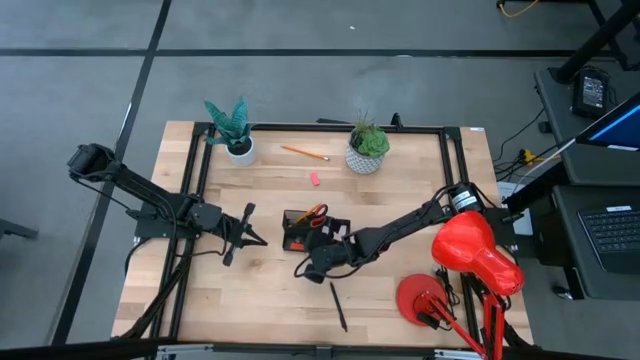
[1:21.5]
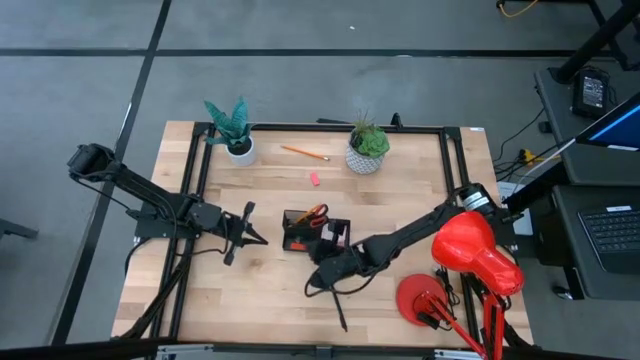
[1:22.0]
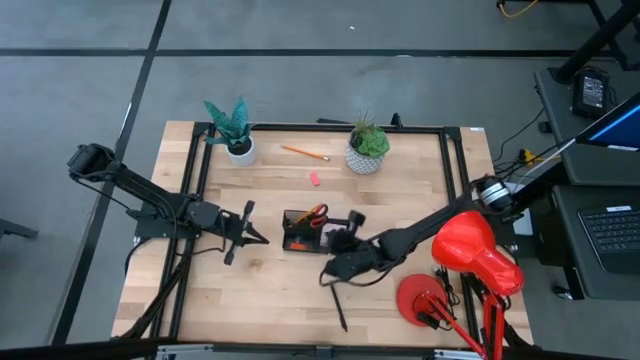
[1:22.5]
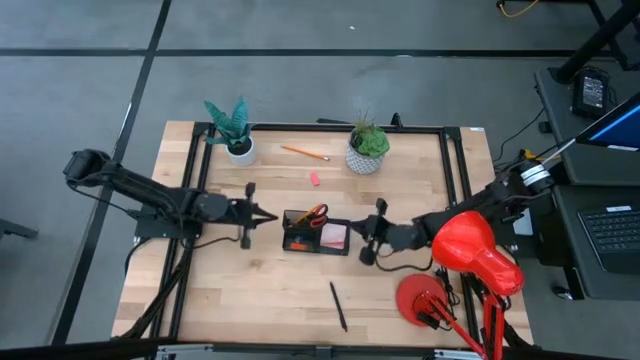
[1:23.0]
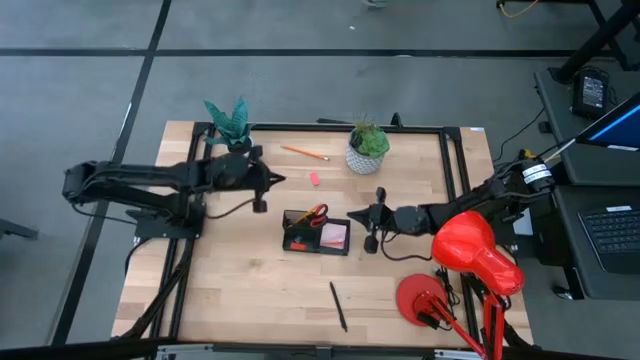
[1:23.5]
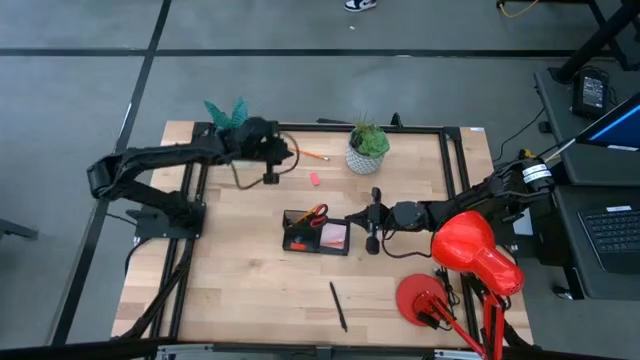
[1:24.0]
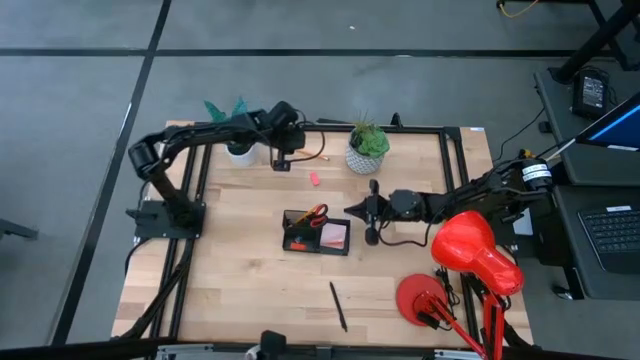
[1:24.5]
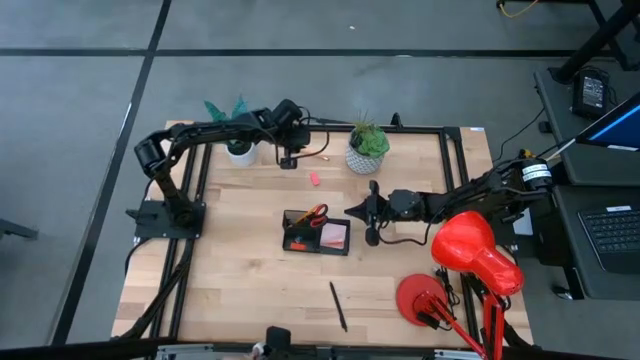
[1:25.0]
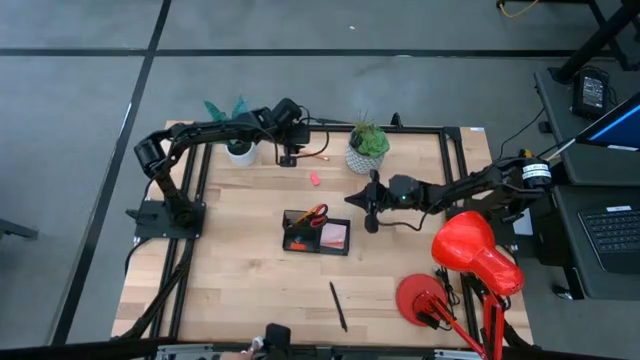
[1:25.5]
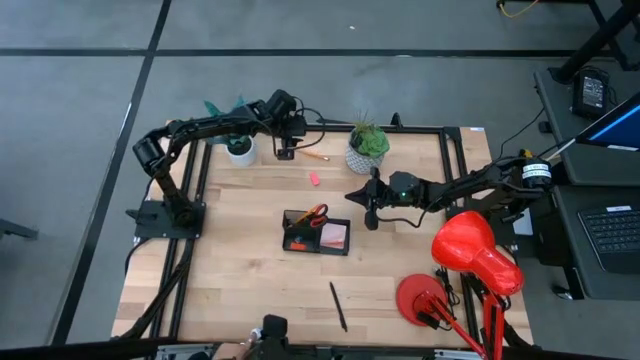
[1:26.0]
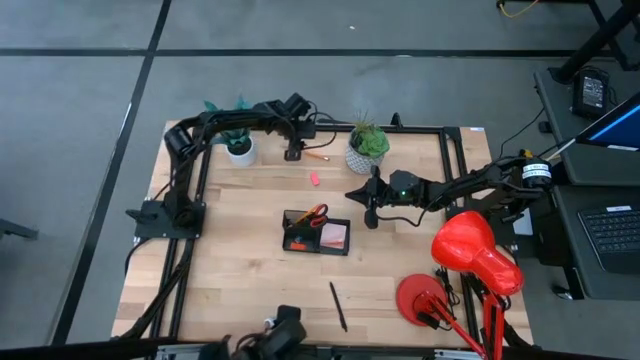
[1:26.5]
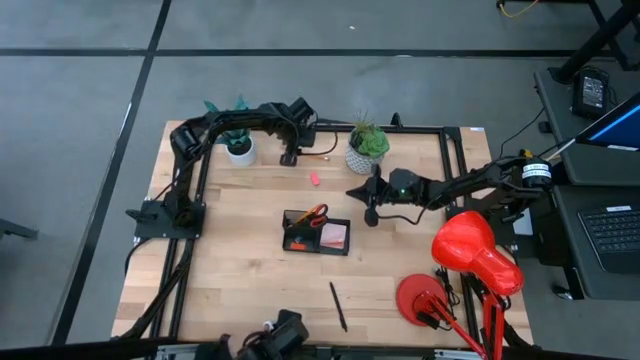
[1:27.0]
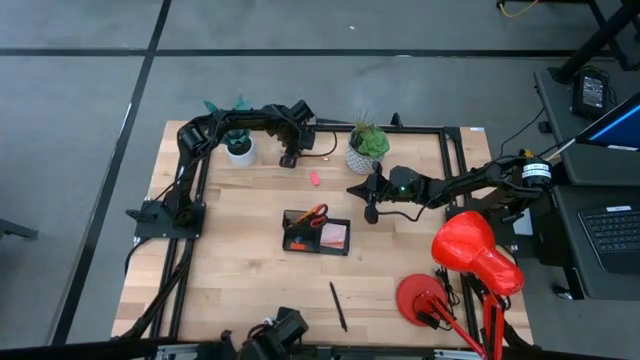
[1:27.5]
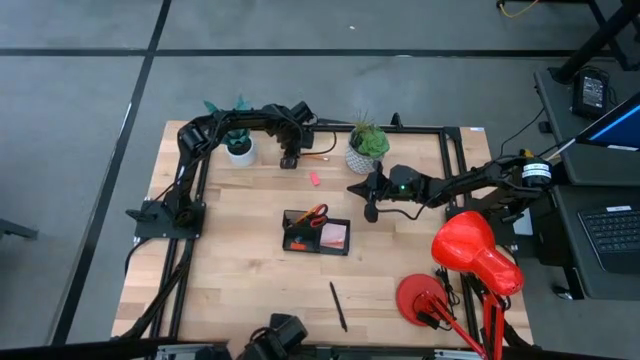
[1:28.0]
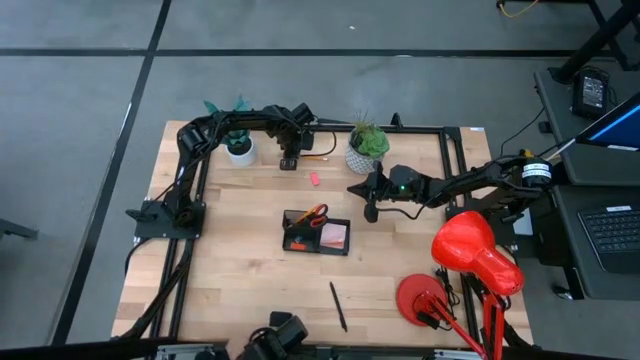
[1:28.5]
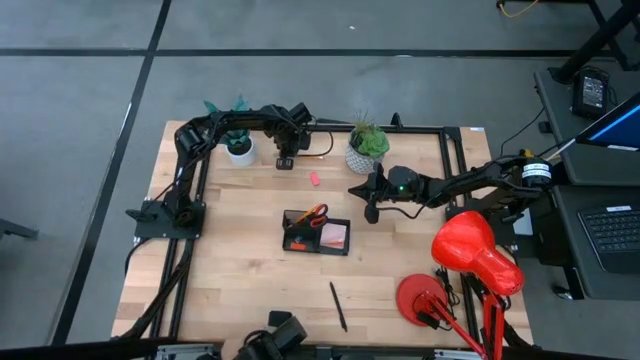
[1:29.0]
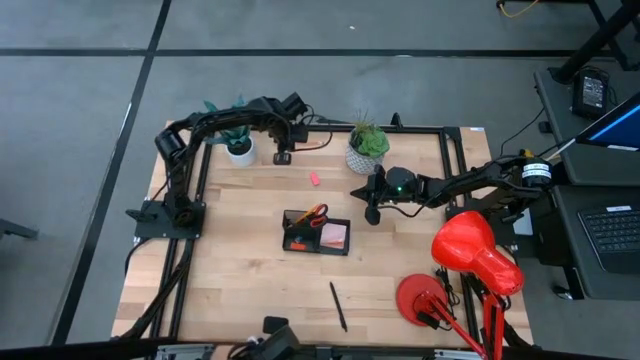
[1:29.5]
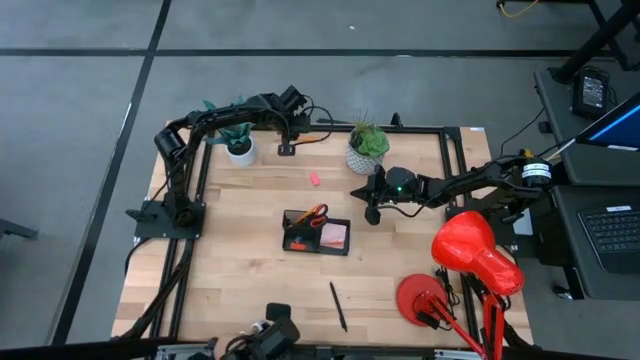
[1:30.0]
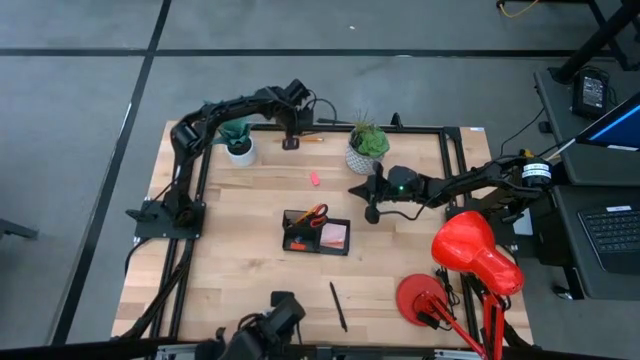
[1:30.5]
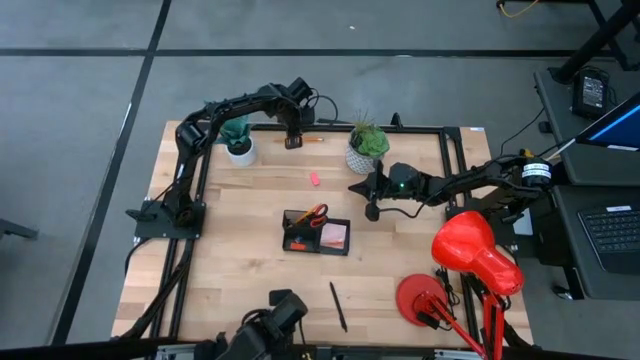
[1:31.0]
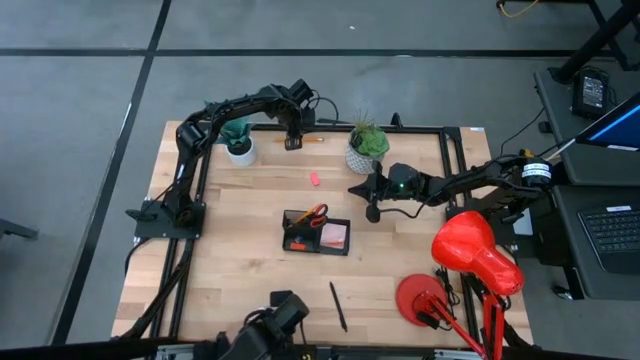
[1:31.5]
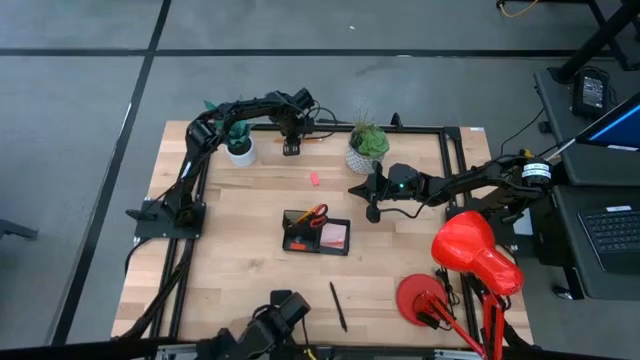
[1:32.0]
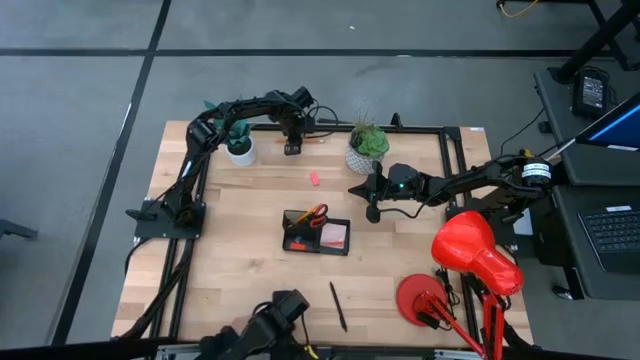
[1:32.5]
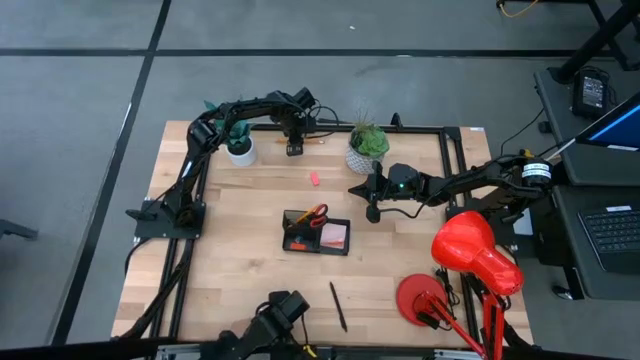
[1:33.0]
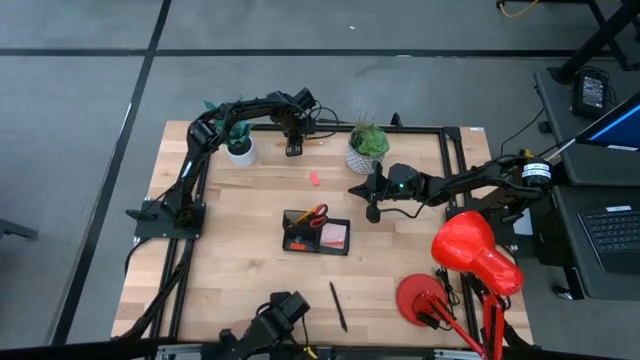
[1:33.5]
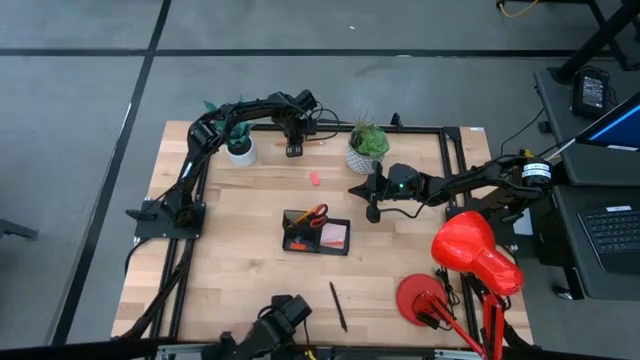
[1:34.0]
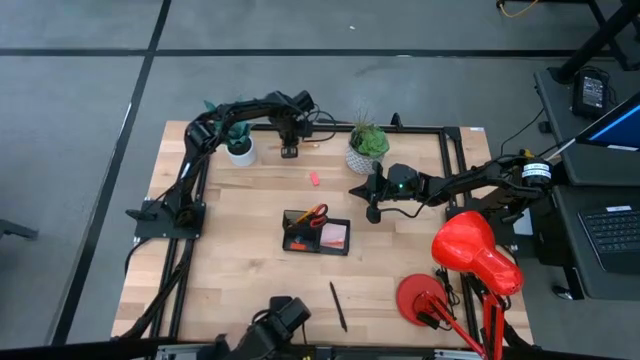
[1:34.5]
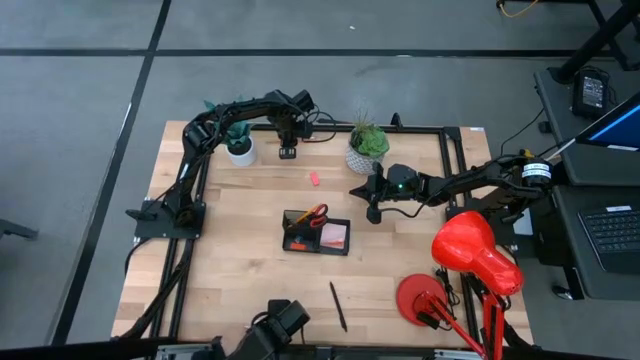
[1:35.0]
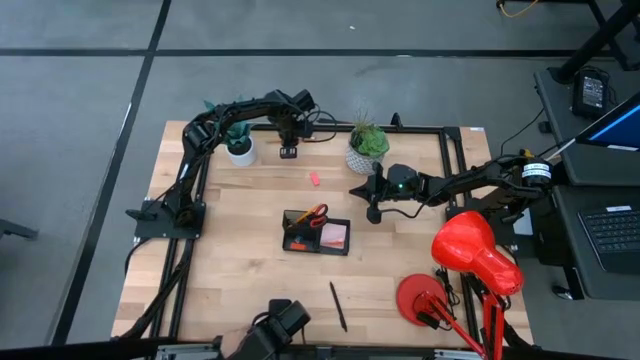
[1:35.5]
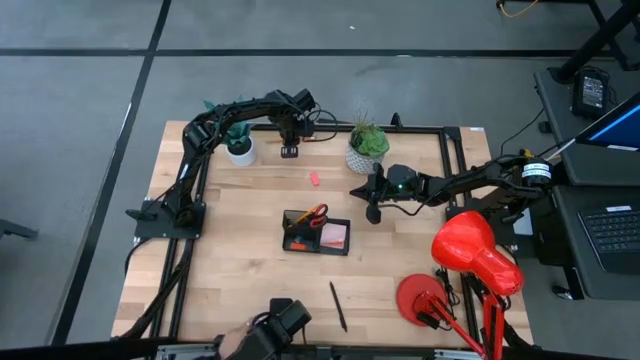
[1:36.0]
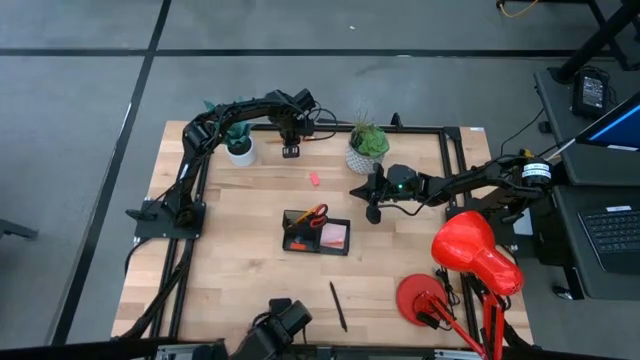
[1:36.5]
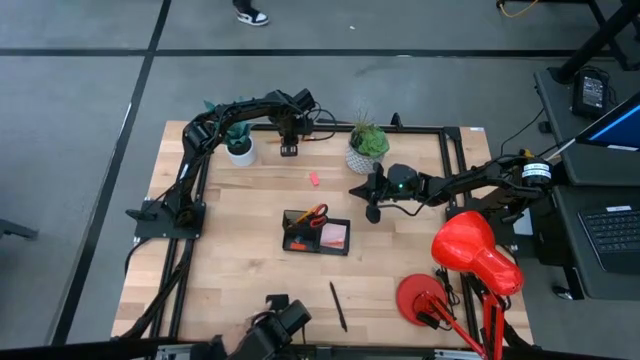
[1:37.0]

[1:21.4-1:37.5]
Task: Pick and place office supplies into organizer
Put the orange pencil into the desk organizer
